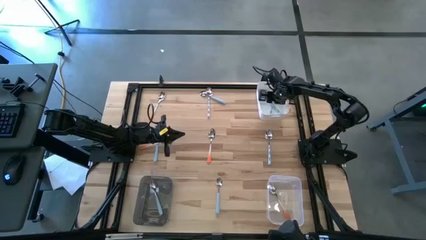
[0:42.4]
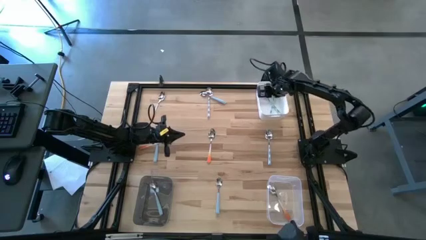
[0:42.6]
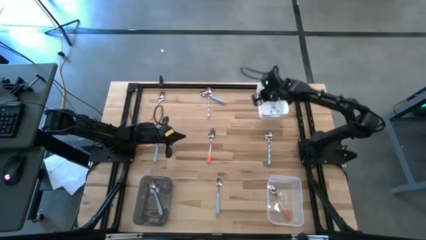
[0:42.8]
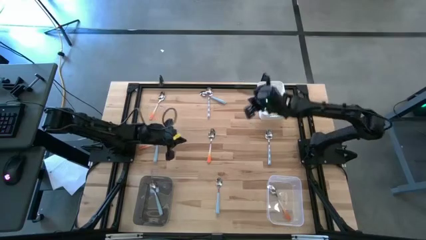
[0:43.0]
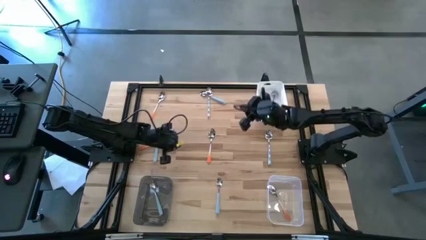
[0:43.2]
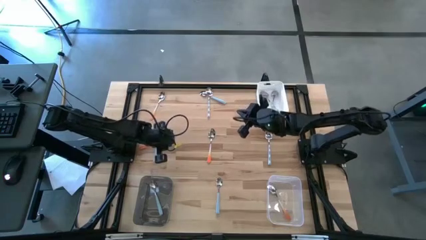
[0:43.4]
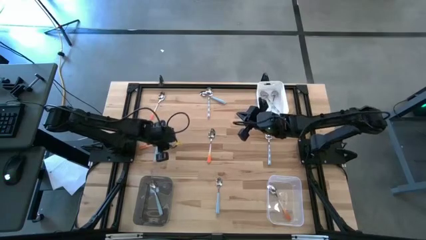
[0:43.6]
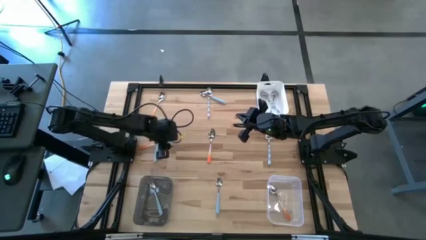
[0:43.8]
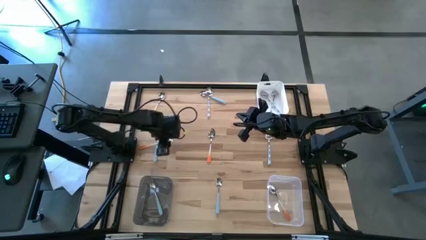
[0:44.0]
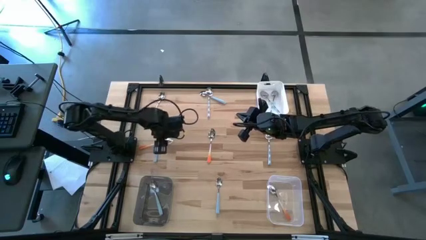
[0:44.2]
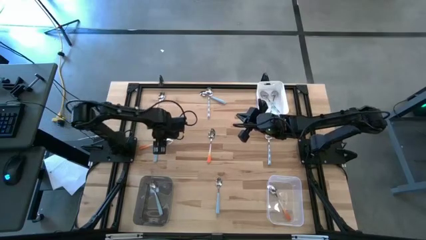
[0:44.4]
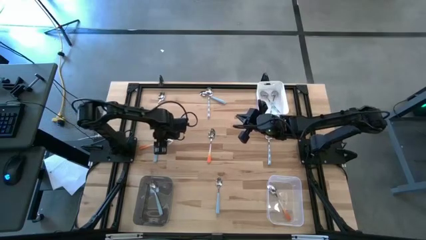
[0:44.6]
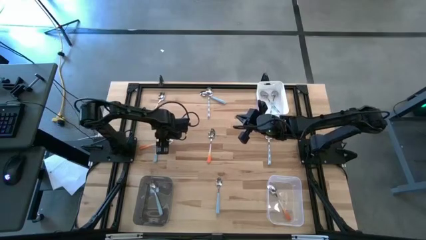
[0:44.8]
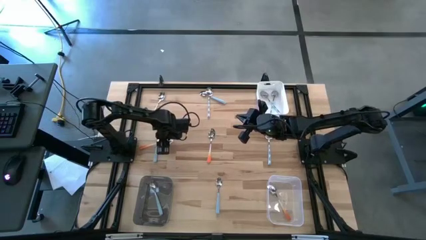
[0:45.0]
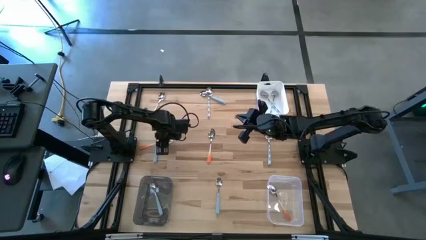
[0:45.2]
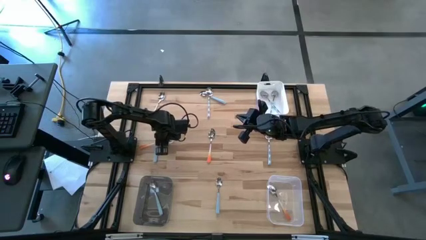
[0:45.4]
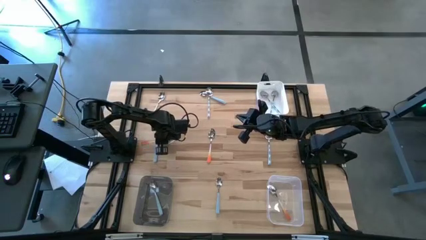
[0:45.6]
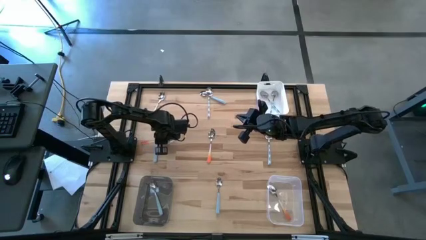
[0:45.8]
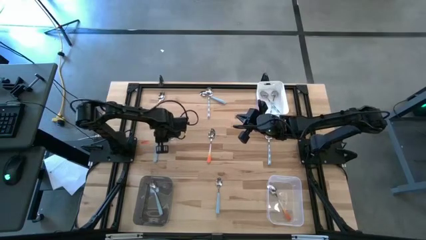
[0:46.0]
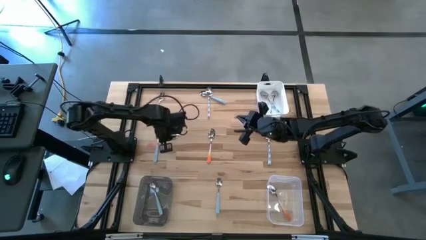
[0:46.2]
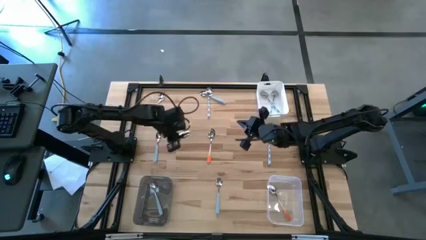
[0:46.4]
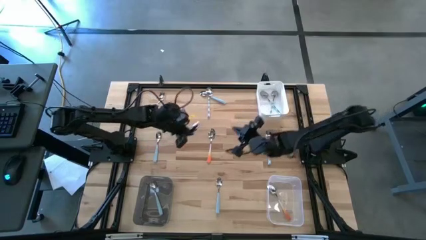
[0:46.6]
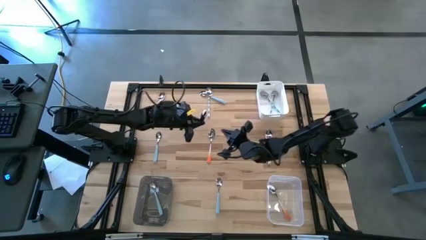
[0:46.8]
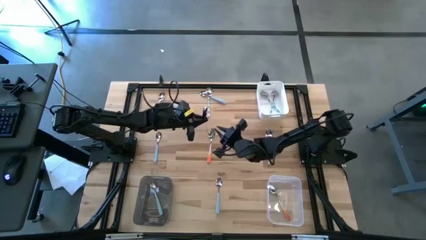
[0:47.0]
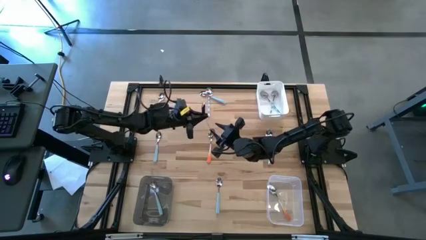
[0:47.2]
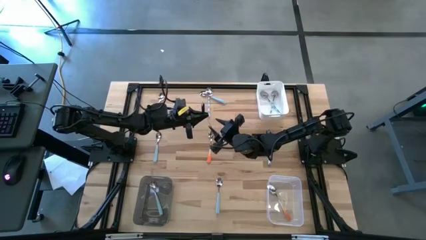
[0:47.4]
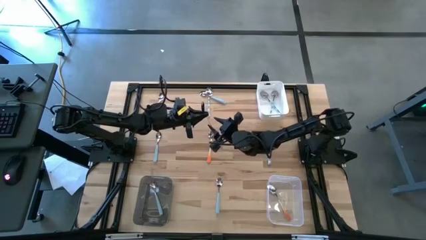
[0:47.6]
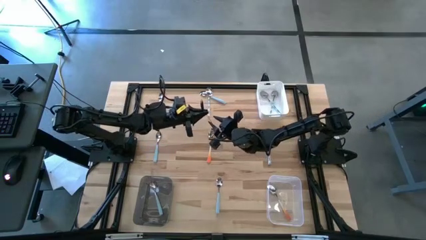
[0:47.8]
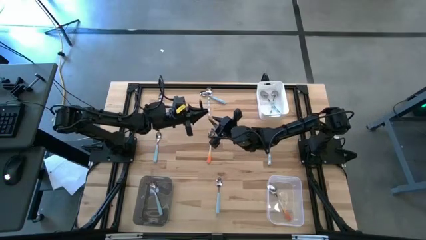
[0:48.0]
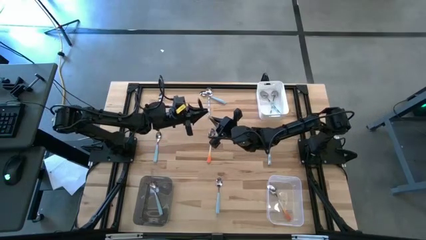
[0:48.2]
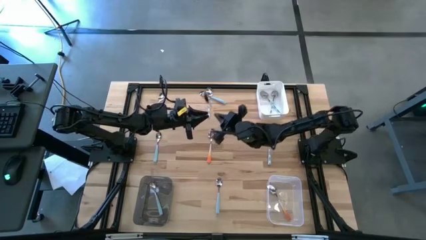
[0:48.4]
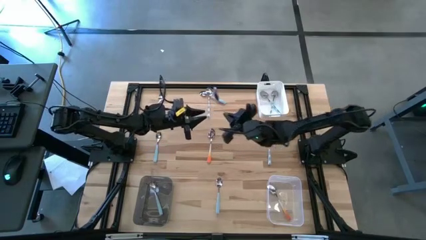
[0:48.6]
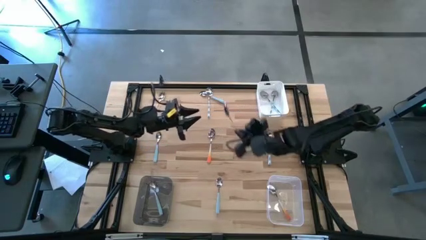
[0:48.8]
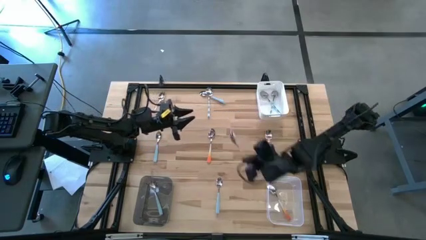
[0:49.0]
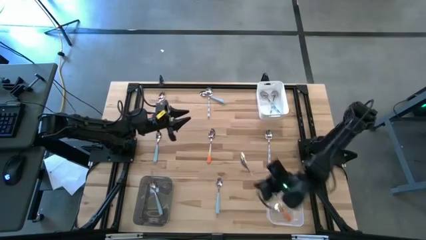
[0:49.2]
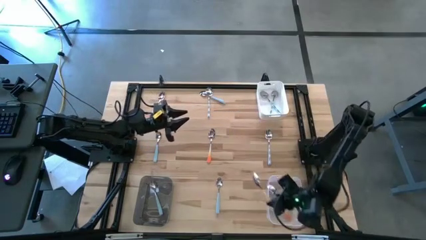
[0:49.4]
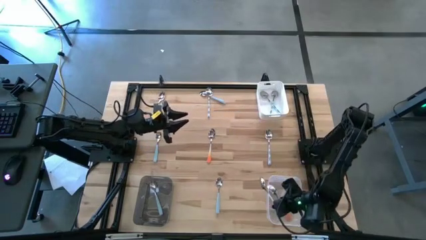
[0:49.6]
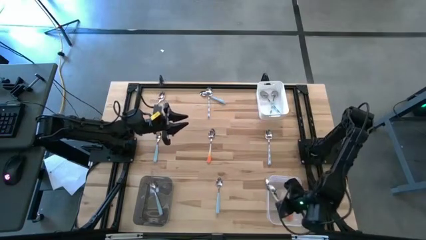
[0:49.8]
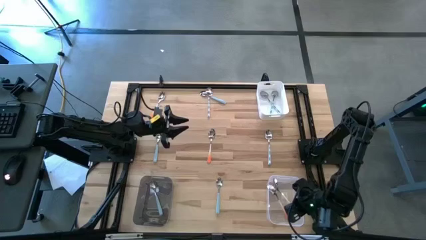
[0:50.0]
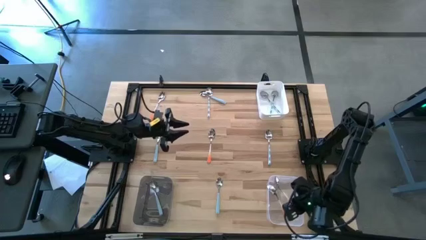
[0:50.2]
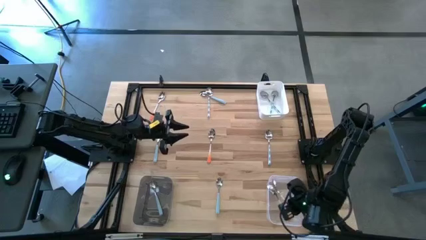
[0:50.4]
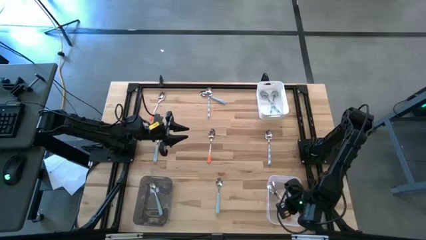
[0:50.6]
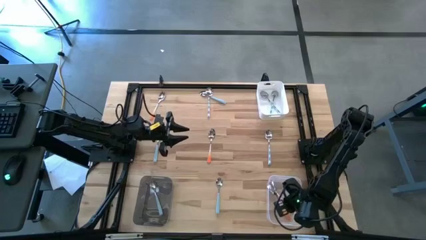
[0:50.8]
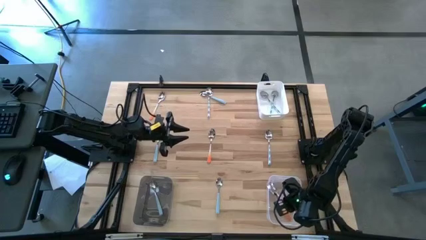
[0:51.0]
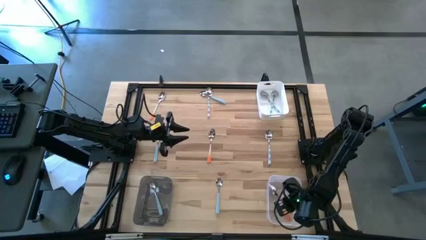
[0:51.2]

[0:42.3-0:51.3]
Task: Sort silverware by color (type)
Put the orange spoon into the transparent bin

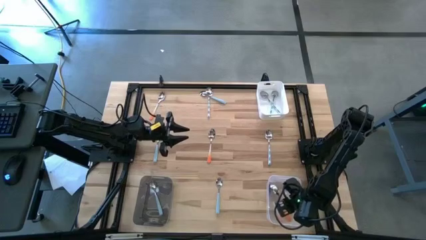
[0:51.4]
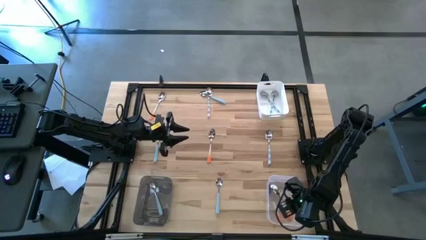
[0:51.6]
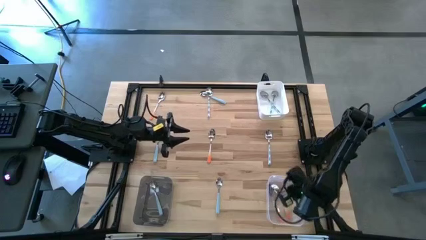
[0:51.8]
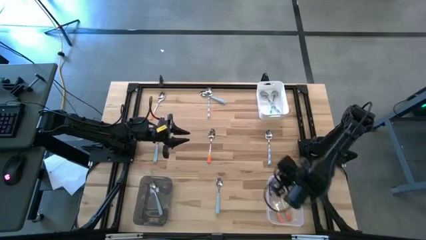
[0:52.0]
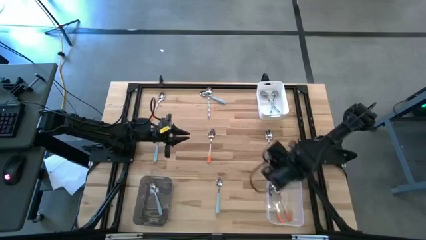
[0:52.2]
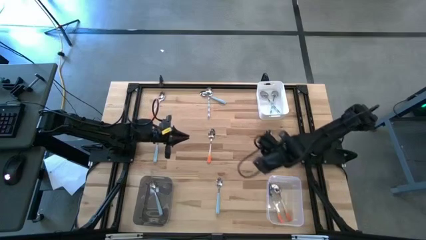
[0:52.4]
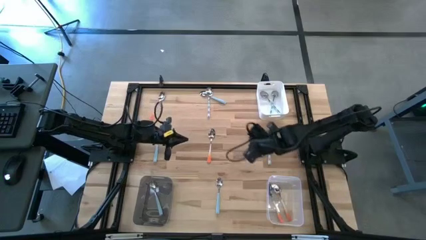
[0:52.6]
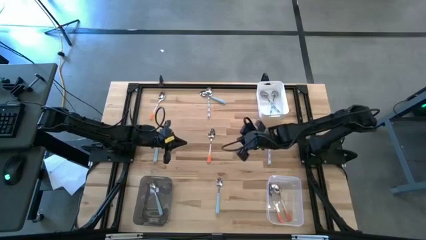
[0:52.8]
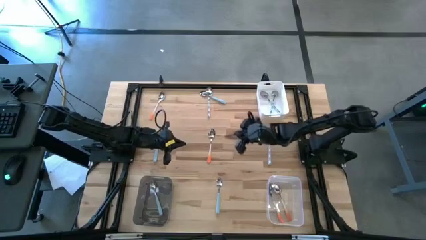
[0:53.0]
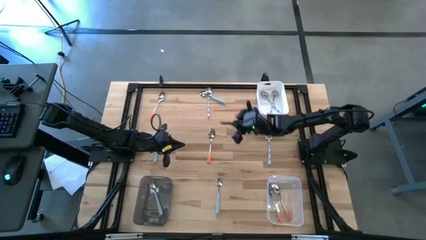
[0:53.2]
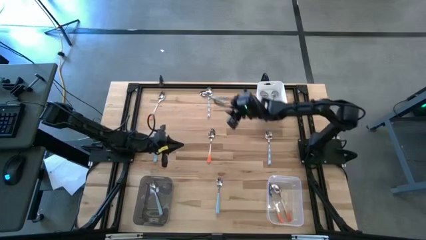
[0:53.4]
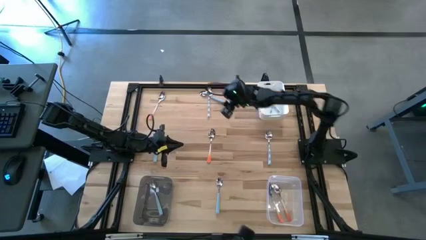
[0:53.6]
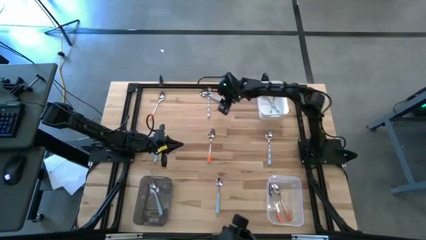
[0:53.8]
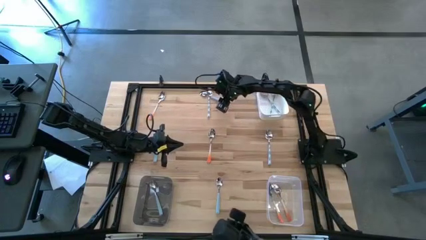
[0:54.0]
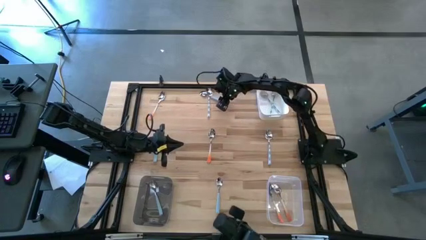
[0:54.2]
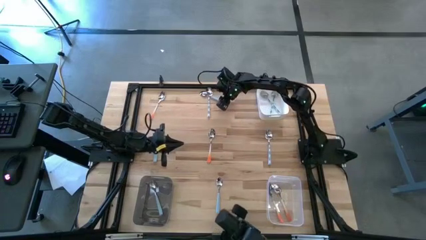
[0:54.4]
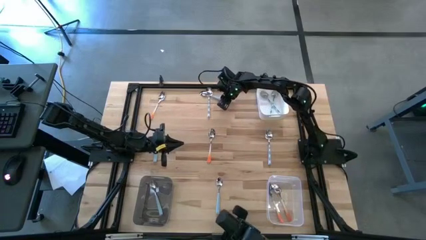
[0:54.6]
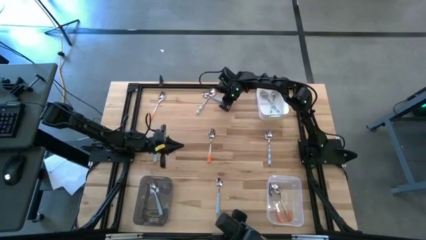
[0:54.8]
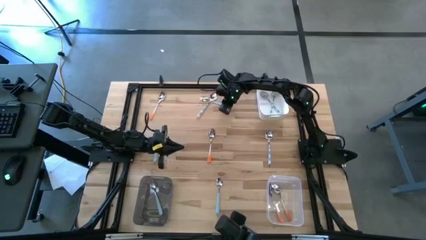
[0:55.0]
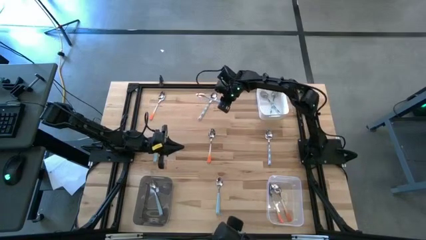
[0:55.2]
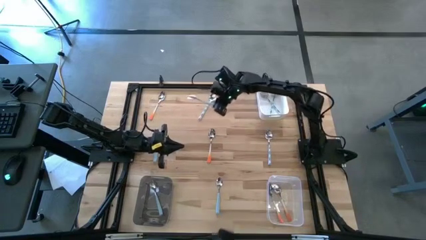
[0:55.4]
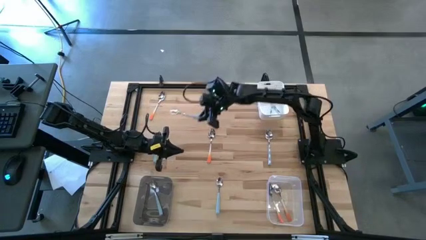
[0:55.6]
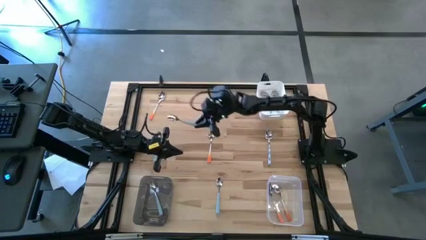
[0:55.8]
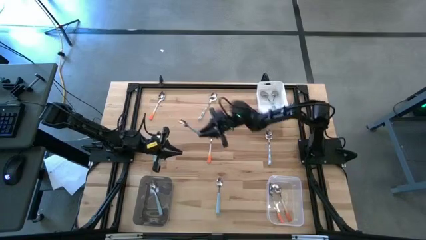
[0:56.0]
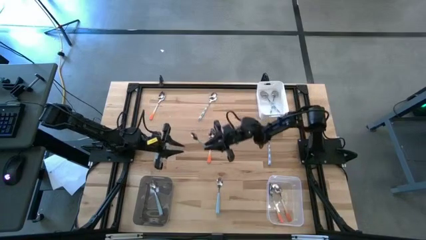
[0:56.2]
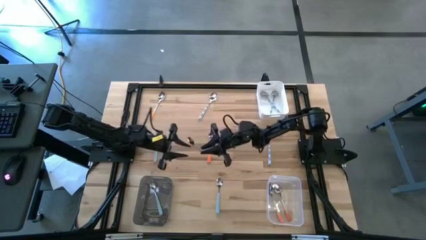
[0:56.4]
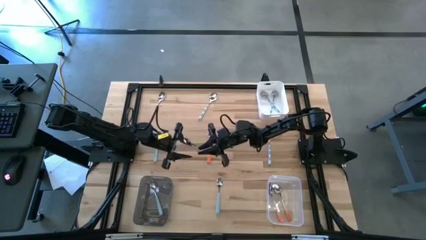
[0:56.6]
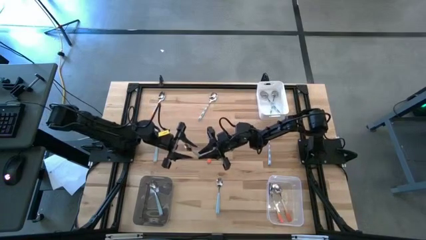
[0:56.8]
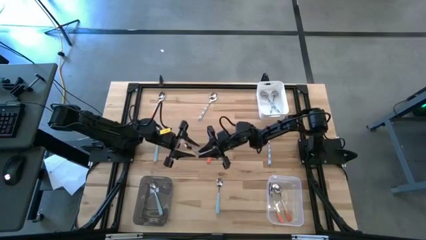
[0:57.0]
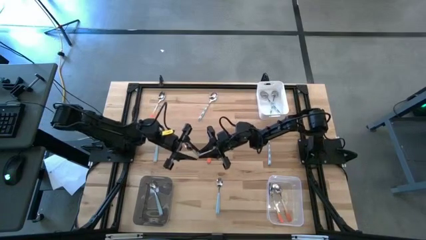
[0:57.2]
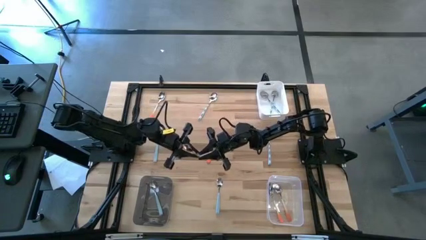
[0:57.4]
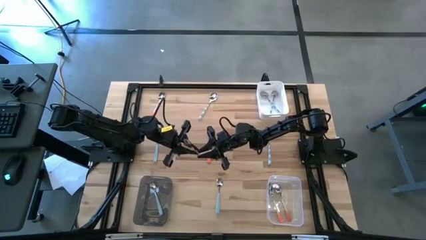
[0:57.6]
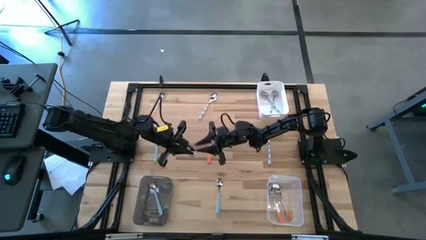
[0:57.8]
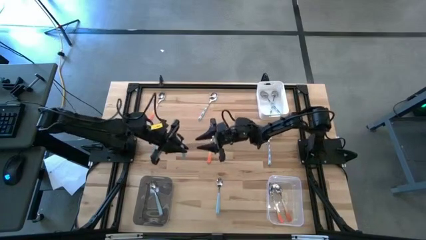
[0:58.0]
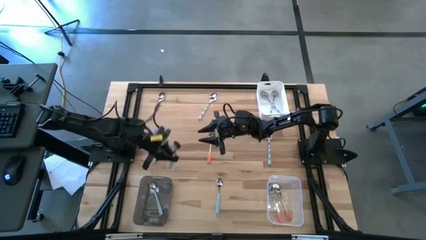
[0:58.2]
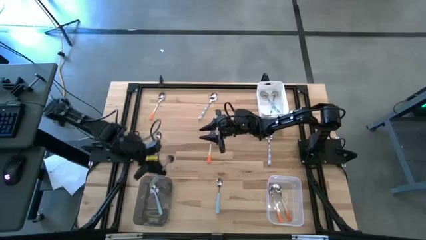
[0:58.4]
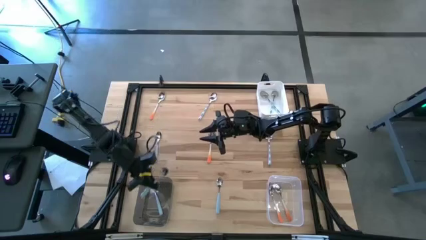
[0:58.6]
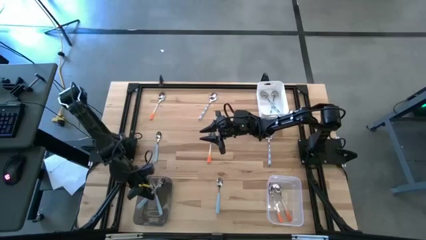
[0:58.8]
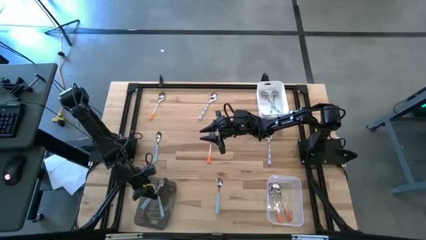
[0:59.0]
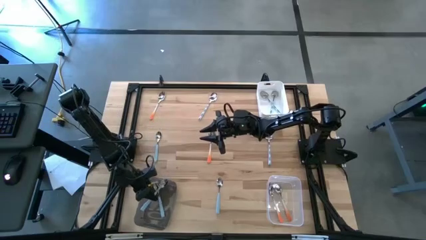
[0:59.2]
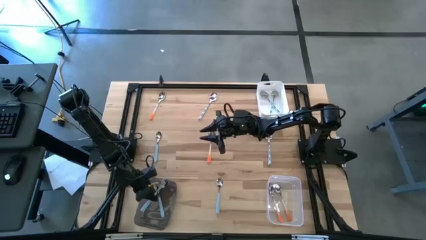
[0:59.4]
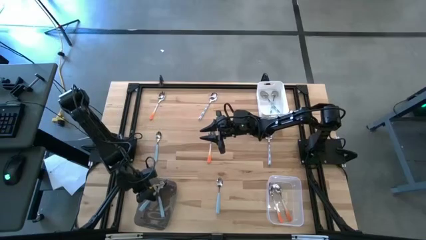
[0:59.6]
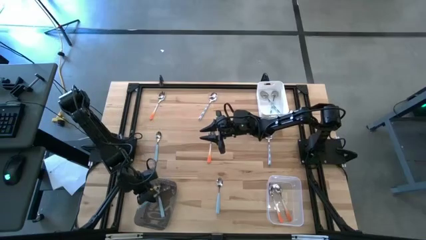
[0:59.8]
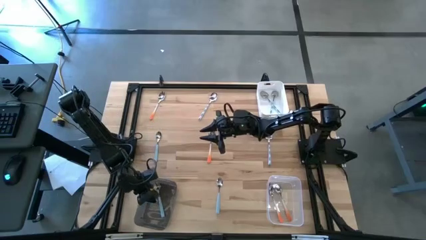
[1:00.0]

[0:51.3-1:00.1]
Put the light blue spoon into the black bin

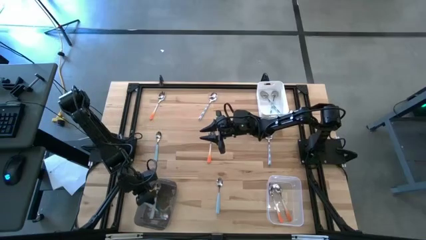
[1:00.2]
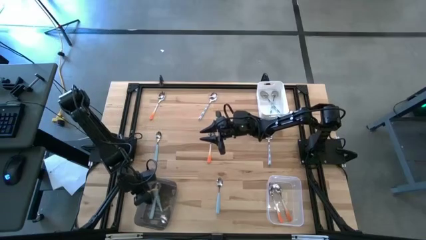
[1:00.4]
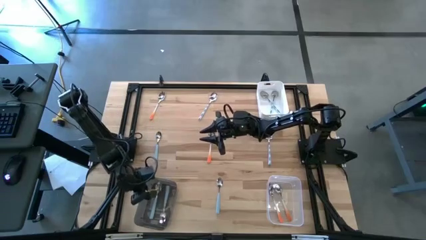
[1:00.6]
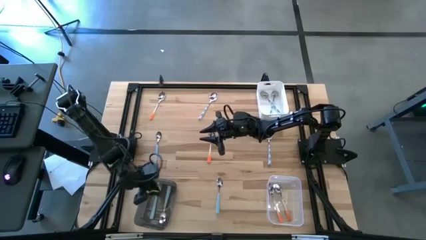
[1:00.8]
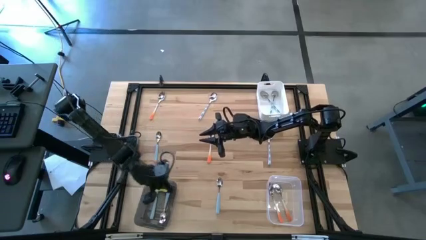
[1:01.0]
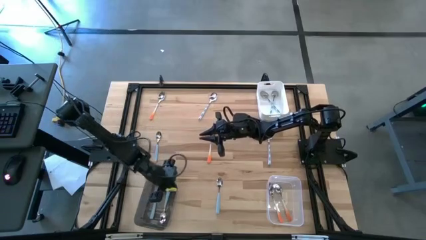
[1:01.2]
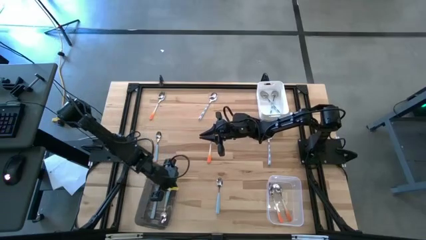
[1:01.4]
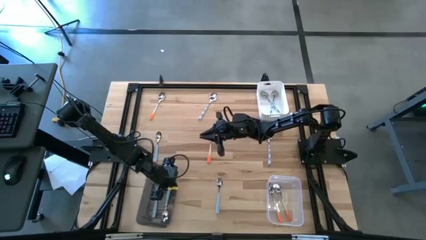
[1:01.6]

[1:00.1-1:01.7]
Adjust the black bin
